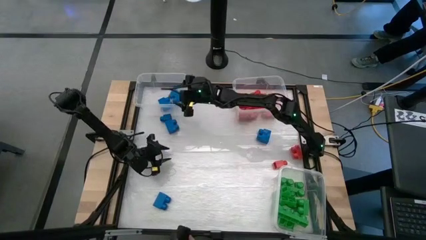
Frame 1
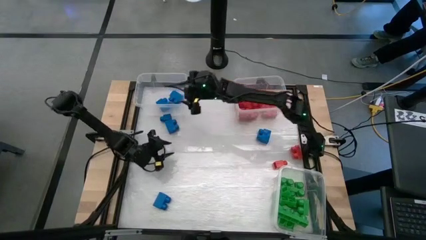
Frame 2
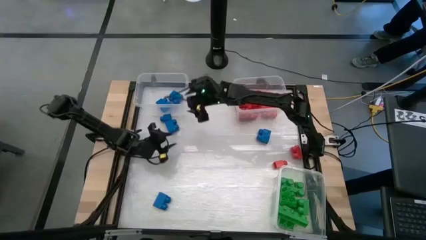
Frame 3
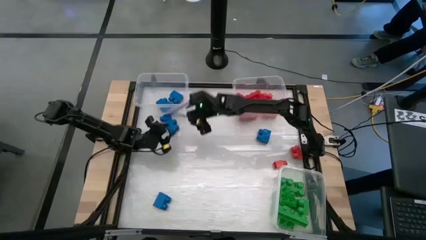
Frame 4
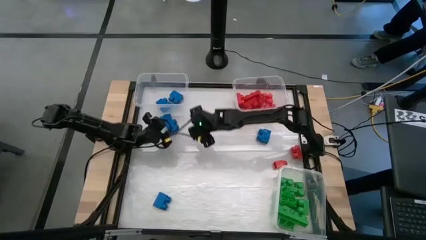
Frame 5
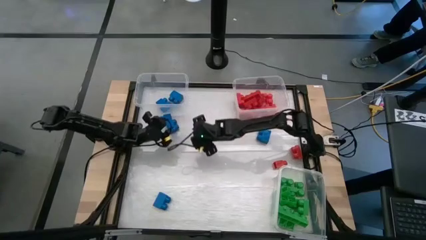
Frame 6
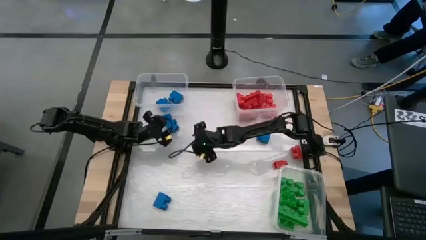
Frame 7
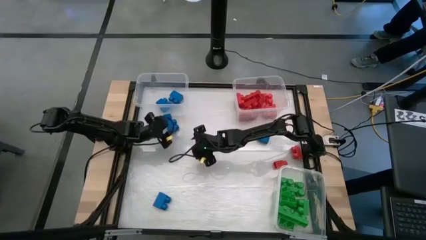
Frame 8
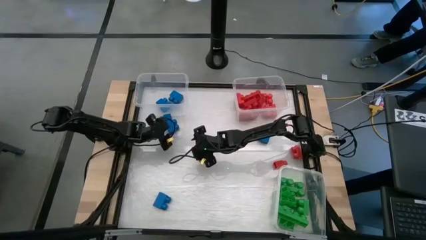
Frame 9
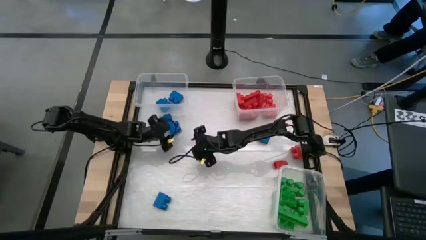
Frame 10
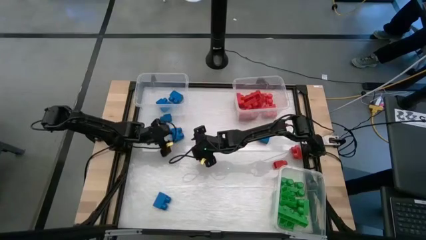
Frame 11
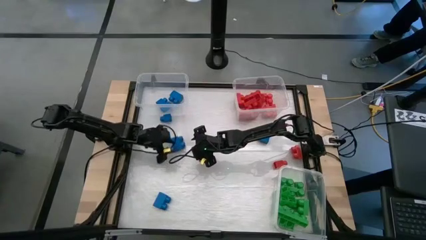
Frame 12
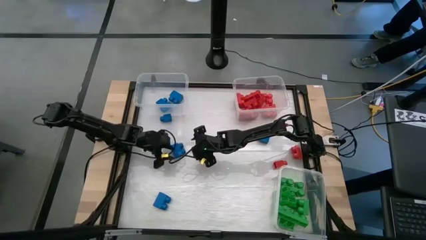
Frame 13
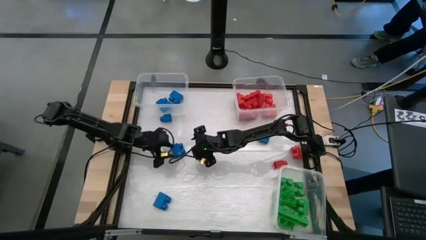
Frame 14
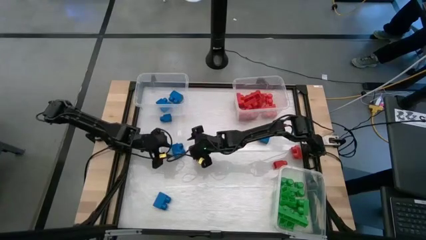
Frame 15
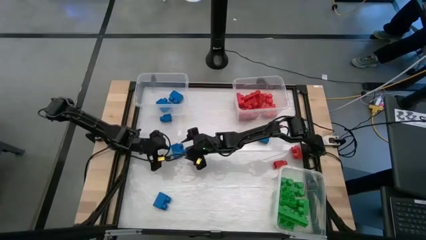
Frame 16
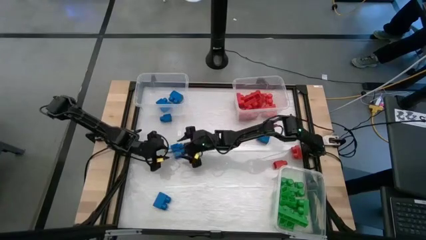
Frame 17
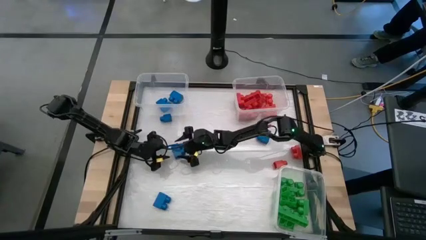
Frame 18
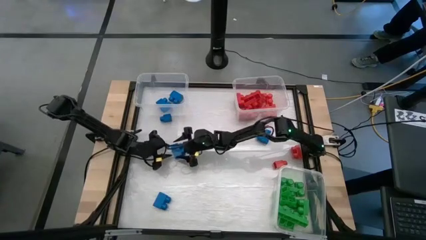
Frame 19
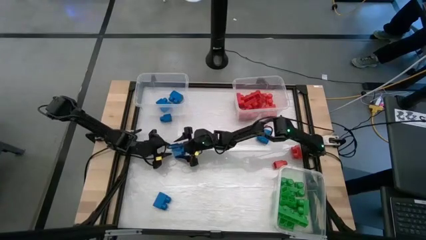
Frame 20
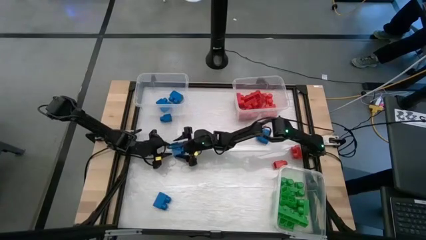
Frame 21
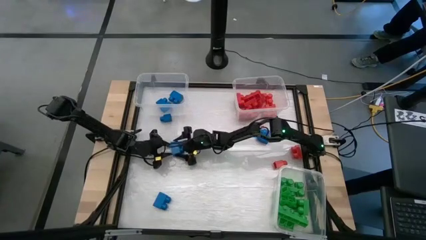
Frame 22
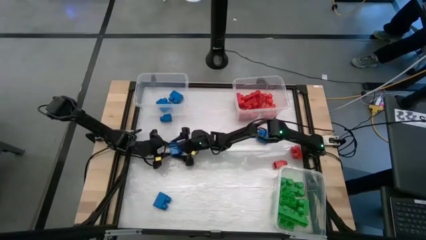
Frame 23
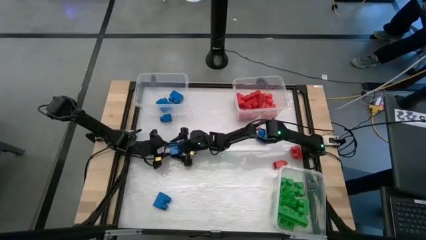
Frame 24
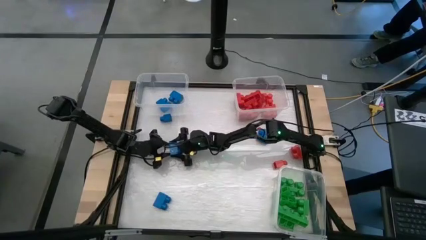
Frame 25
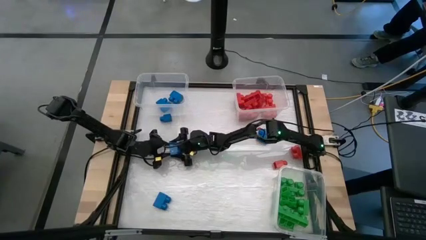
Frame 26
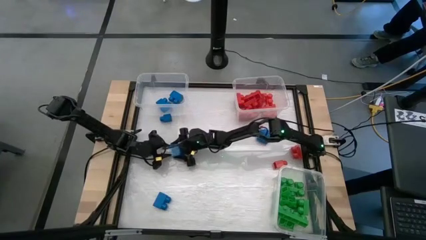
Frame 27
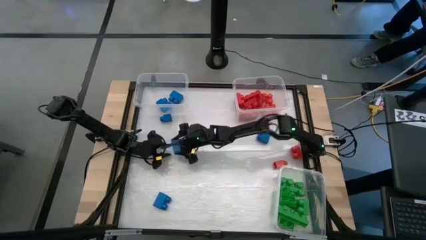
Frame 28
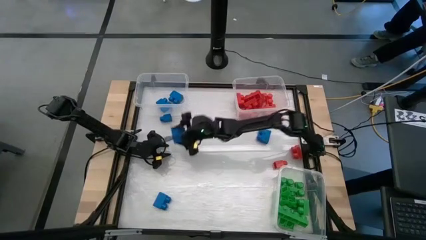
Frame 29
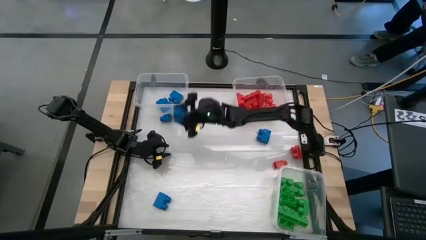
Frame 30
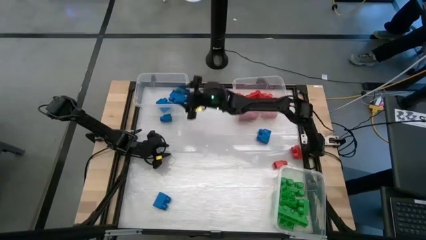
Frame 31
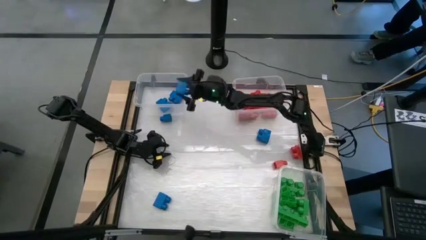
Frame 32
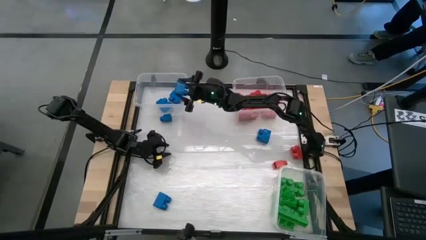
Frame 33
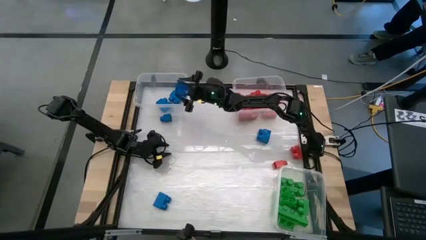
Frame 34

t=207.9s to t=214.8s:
Task: Sort blocks
Put the blue game piece into the top left transparent bin

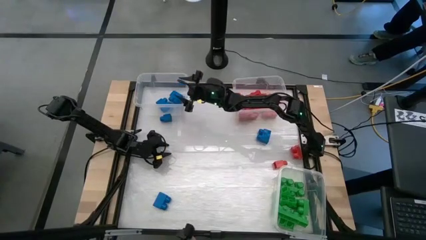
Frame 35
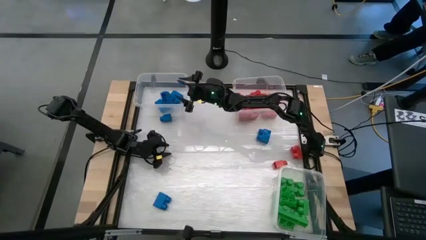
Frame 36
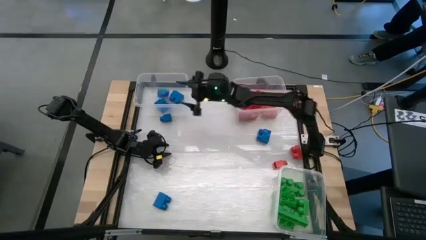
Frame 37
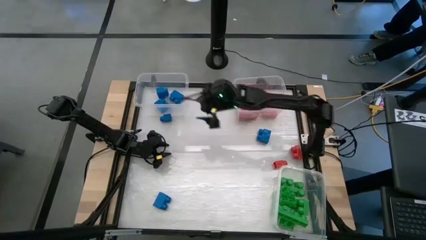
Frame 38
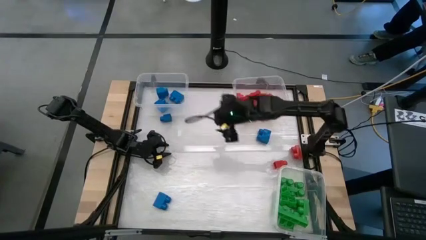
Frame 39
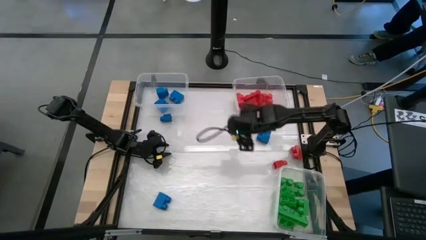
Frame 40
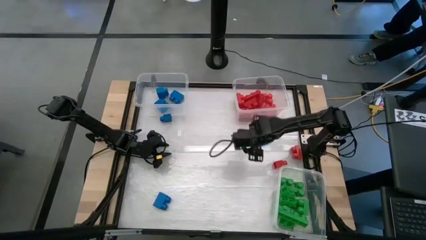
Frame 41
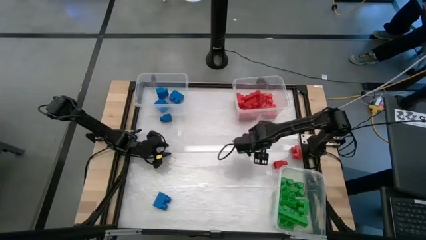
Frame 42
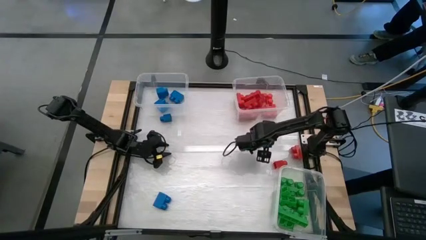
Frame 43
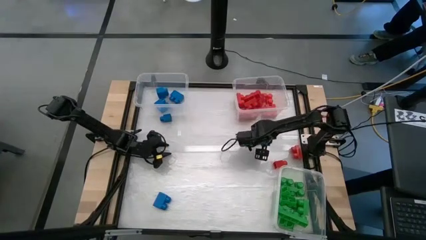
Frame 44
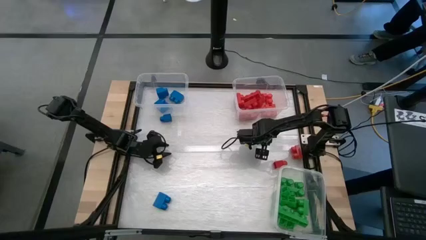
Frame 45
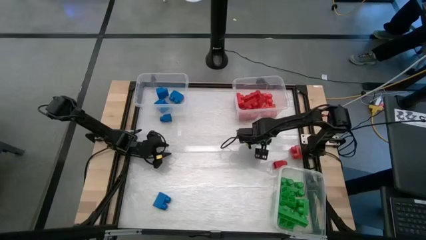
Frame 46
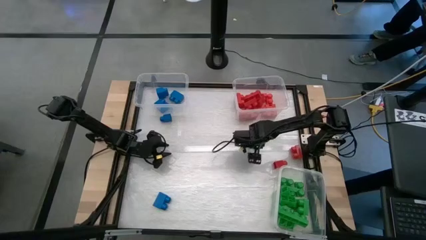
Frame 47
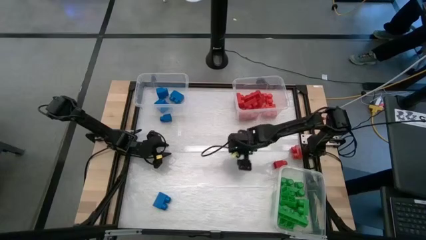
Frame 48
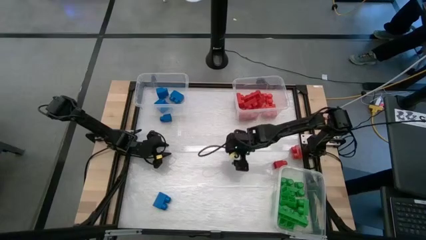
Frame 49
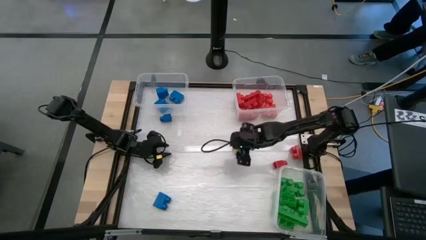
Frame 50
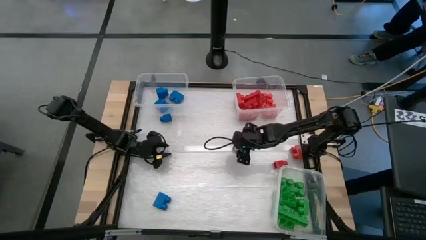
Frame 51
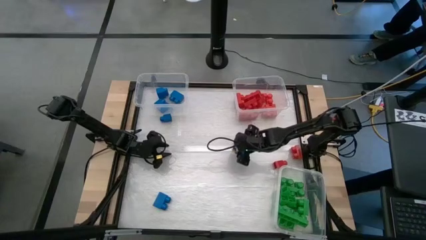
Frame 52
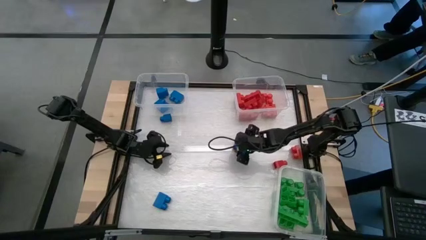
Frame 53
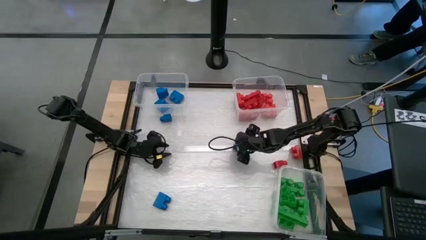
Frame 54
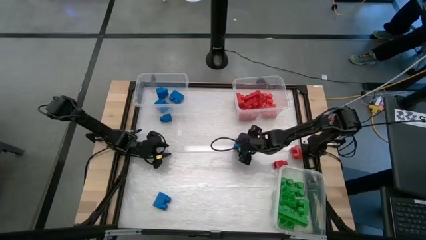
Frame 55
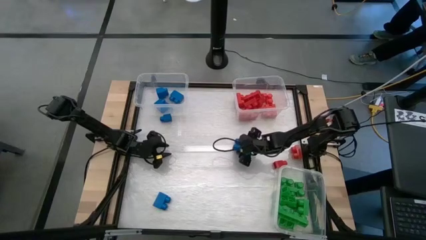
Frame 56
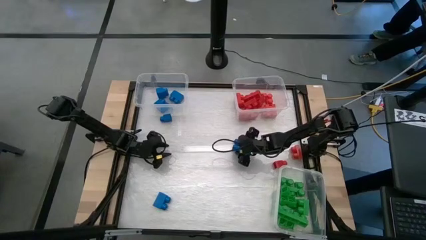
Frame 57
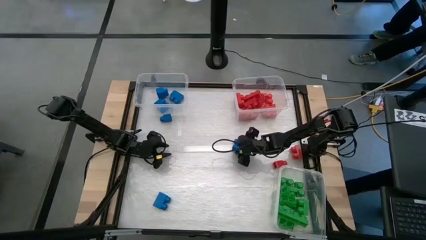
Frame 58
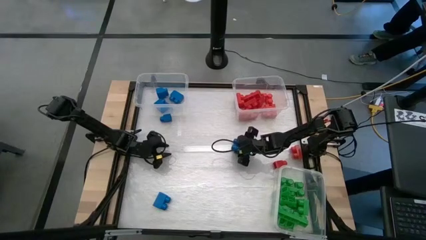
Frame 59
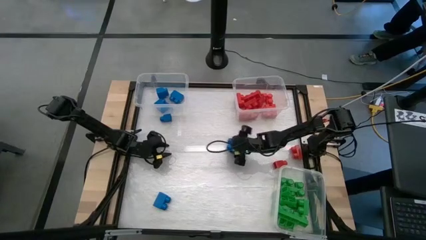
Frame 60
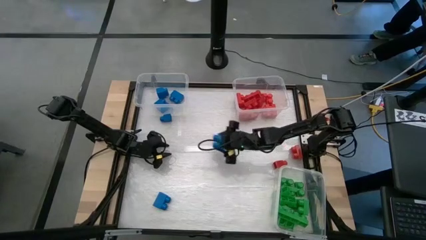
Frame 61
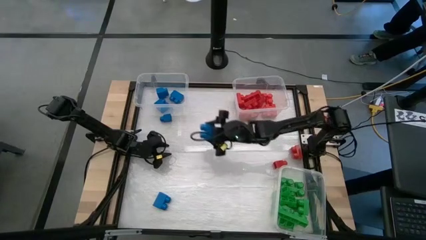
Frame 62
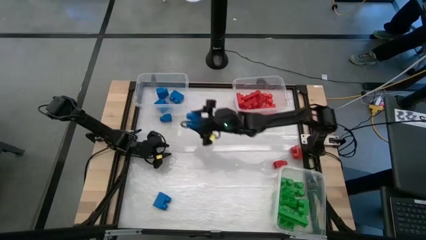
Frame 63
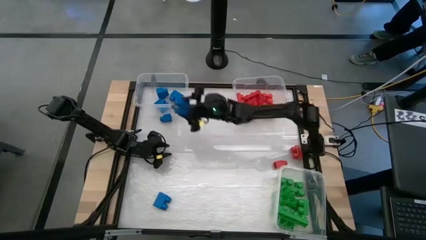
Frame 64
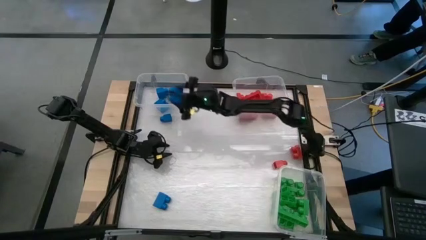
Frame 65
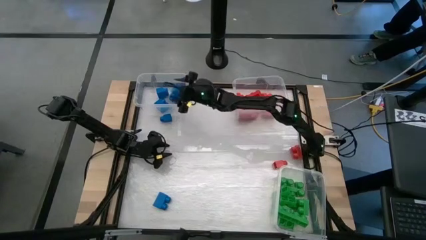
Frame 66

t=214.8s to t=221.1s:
Put the blue game piece into the top left transparent bin

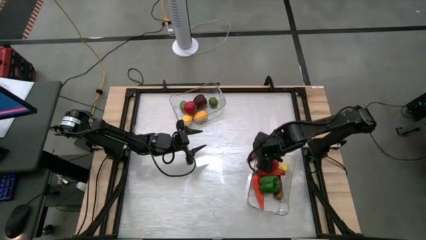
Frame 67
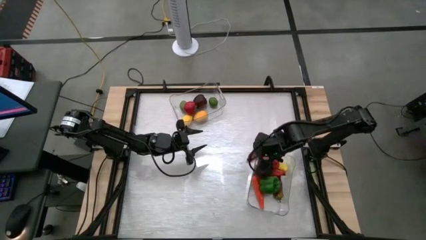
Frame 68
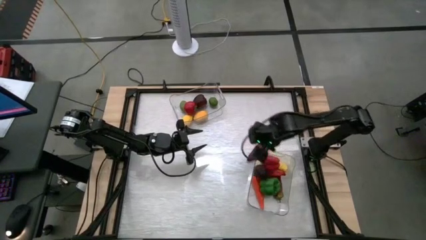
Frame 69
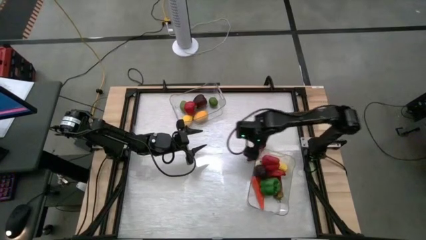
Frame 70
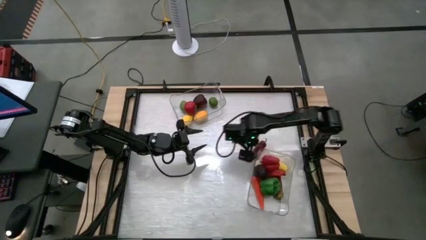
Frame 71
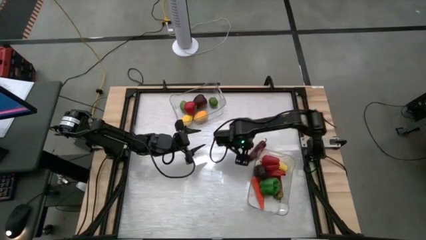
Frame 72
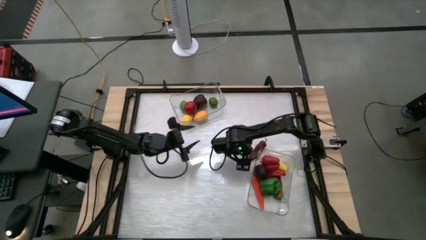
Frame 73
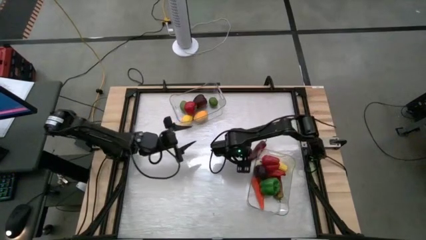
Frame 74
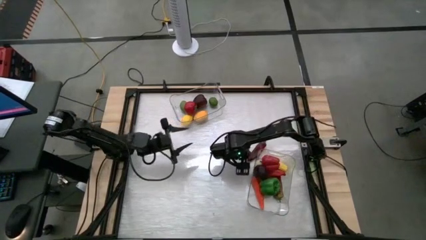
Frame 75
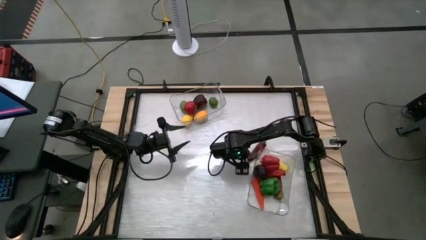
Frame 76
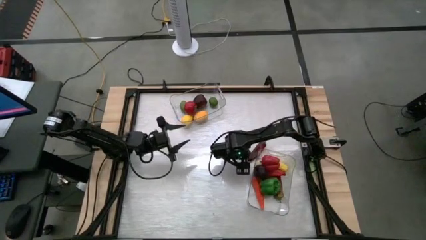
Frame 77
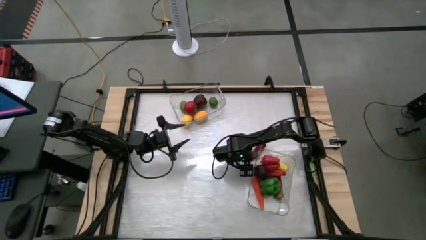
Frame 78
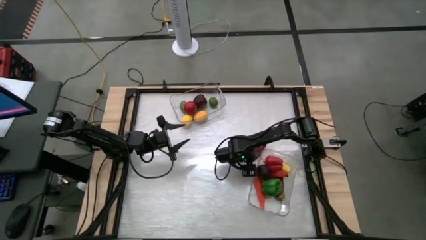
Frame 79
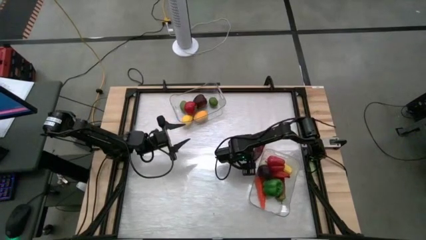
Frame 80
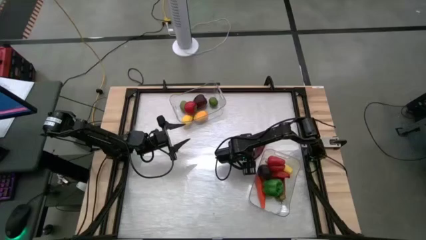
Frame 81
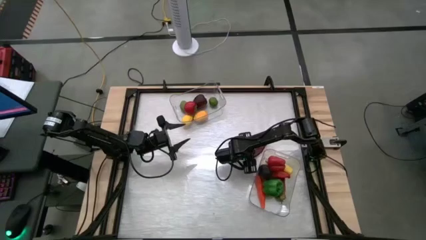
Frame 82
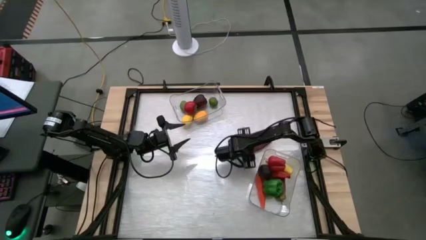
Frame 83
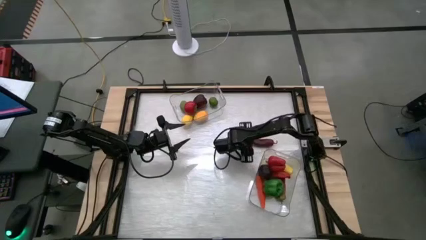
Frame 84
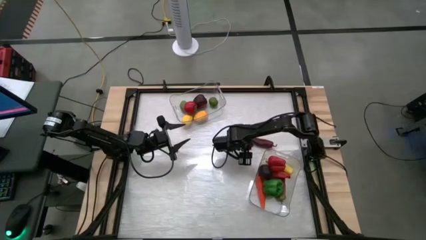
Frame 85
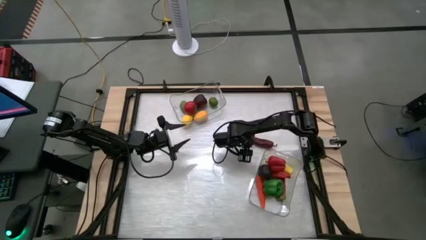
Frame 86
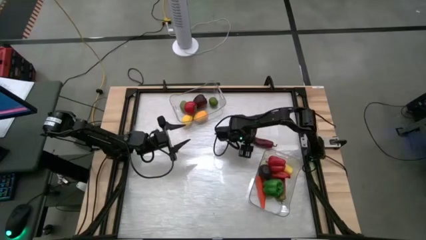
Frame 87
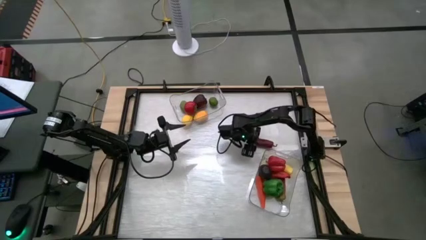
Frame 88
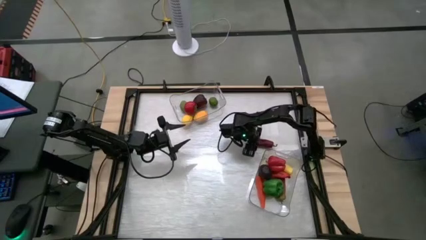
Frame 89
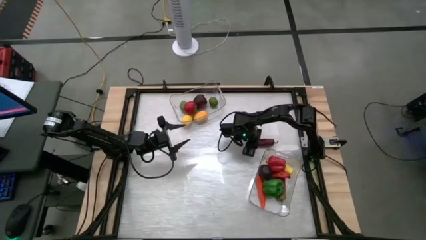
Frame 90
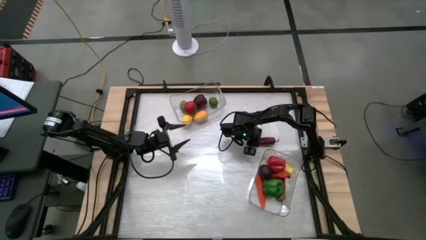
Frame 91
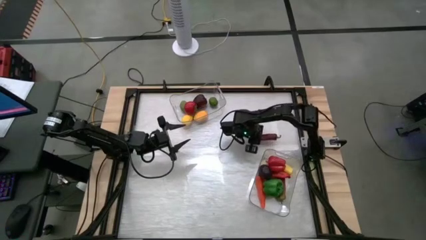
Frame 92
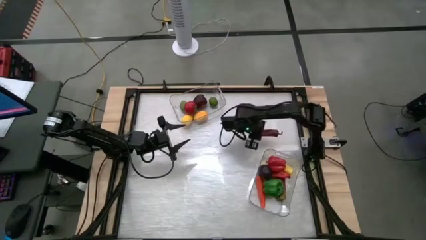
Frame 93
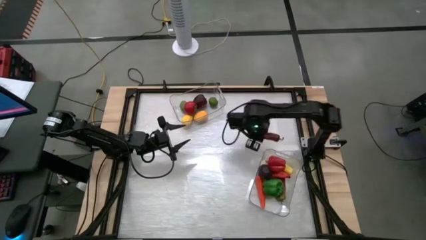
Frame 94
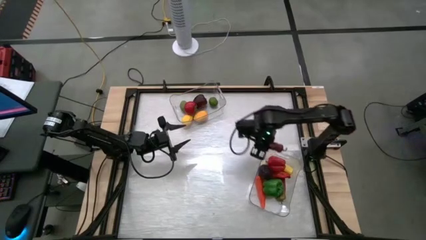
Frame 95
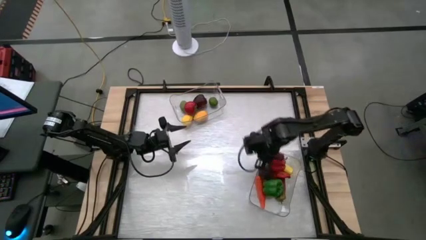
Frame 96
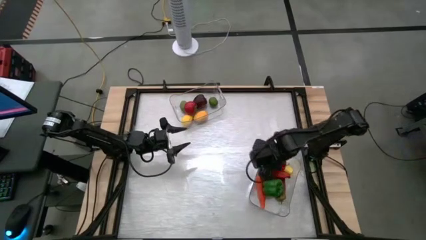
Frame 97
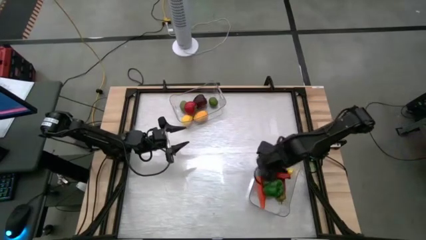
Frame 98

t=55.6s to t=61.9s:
Task: Sort produce into baskets
Put the dark red chili into the bottom transparent bin
